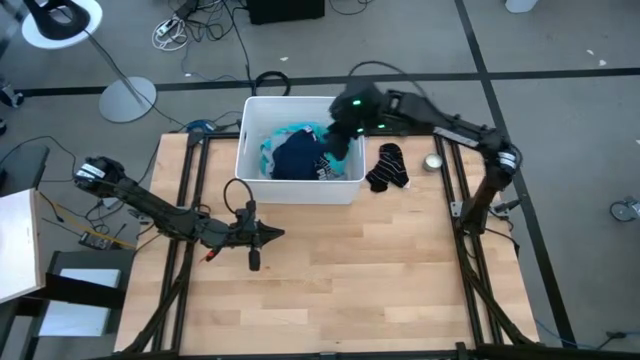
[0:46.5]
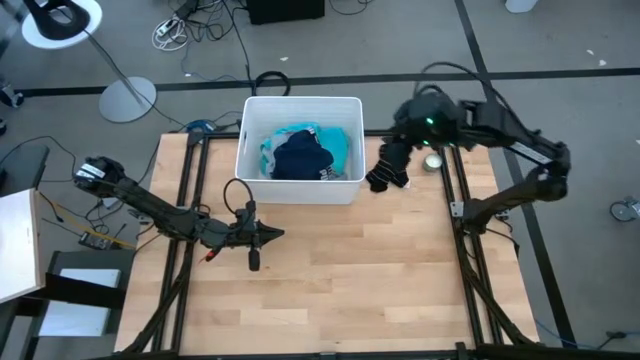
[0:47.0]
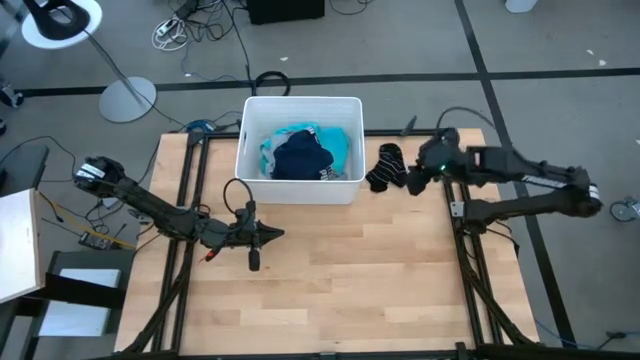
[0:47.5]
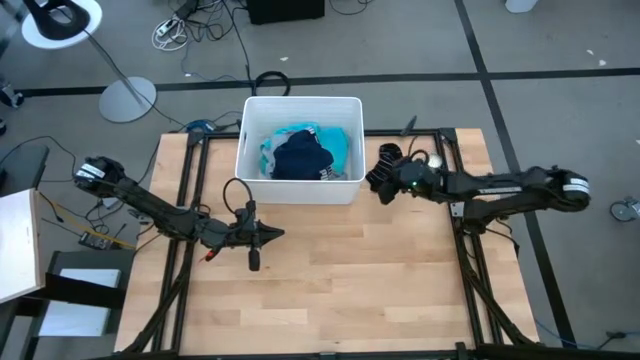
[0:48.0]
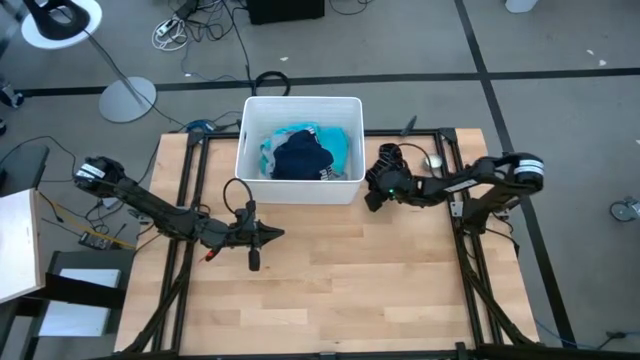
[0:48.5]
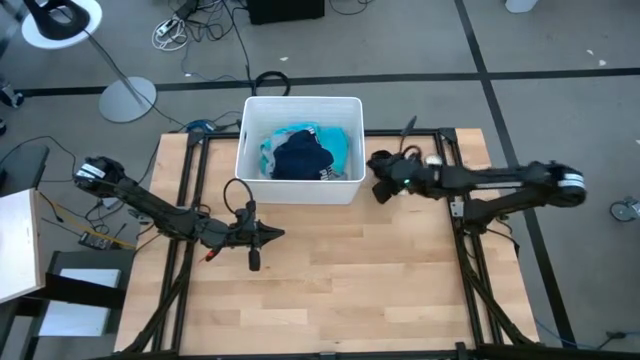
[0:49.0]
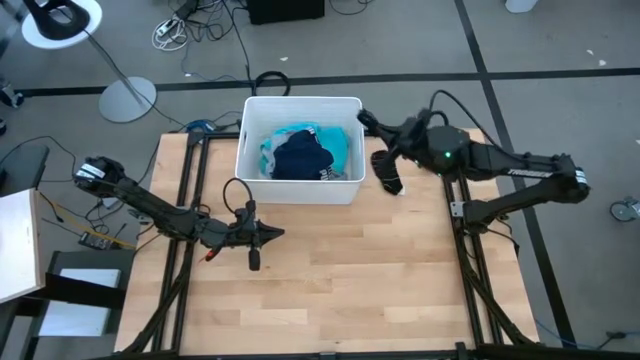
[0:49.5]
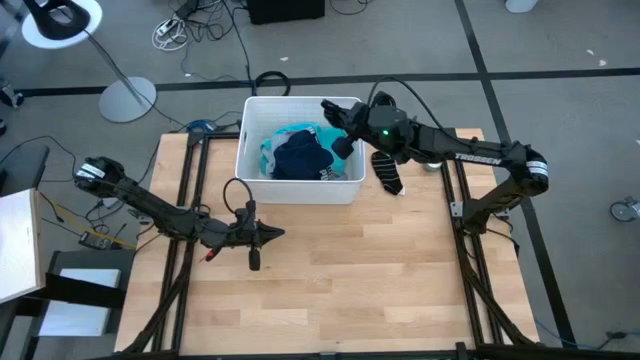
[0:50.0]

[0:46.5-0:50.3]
Task: Sort clothes
Put the left black sock into the white laundry bin

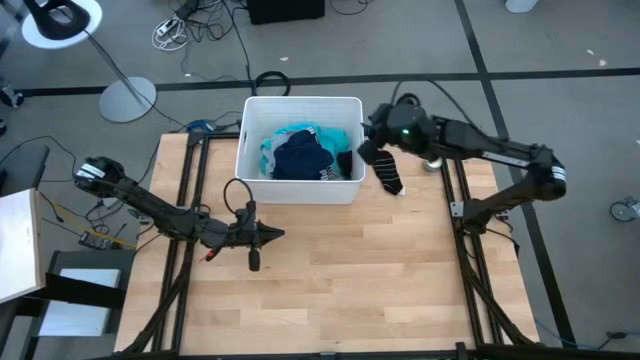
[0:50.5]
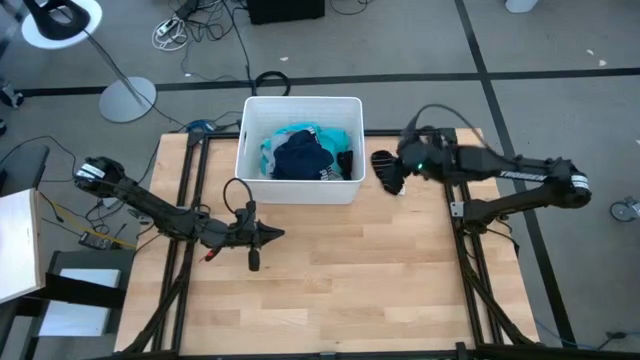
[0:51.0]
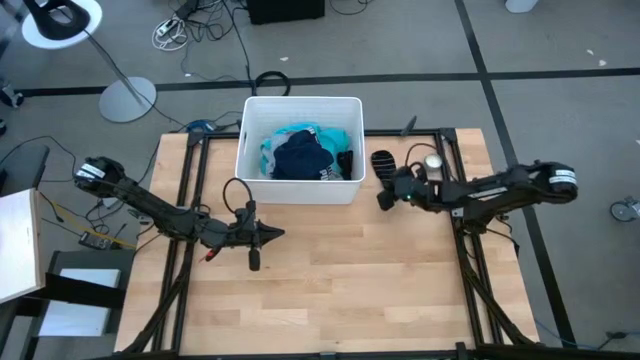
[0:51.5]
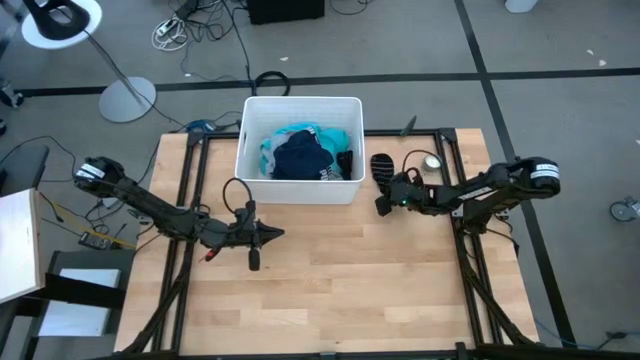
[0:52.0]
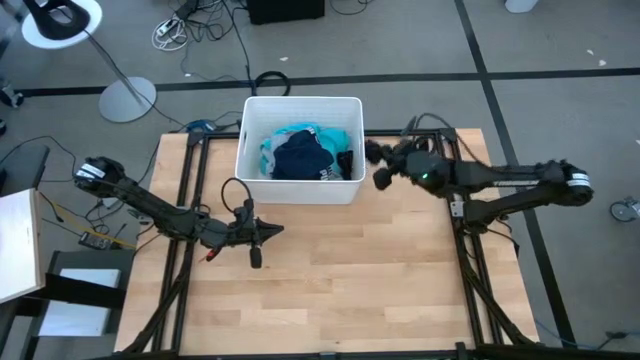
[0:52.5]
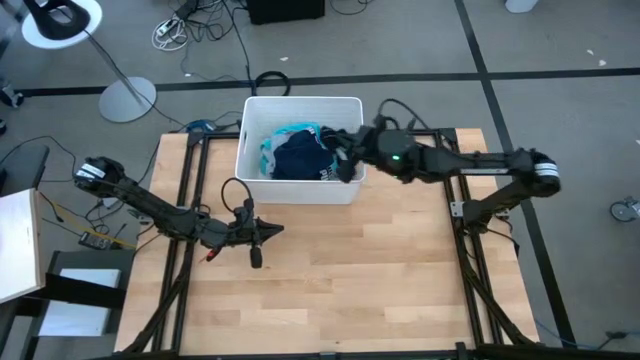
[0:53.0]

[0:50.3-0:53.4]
Put the black sock into the white laundry bin

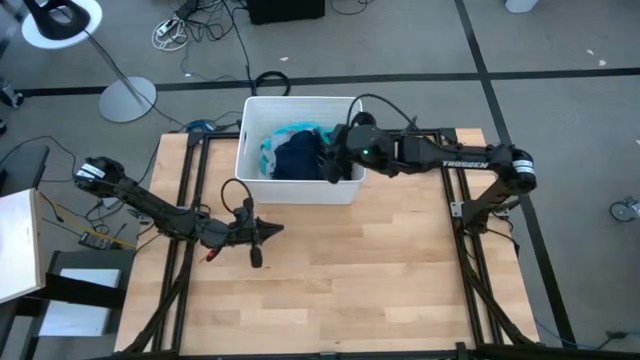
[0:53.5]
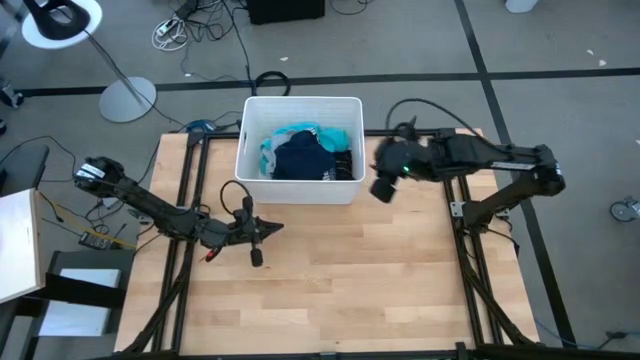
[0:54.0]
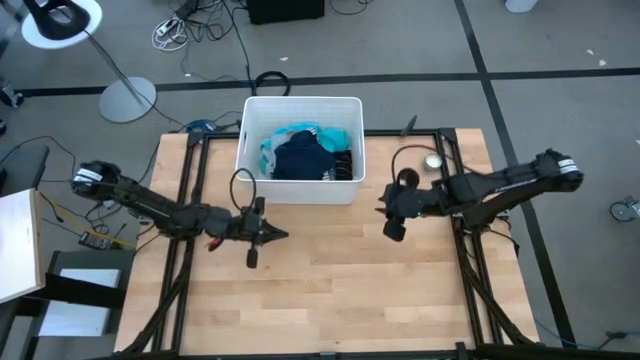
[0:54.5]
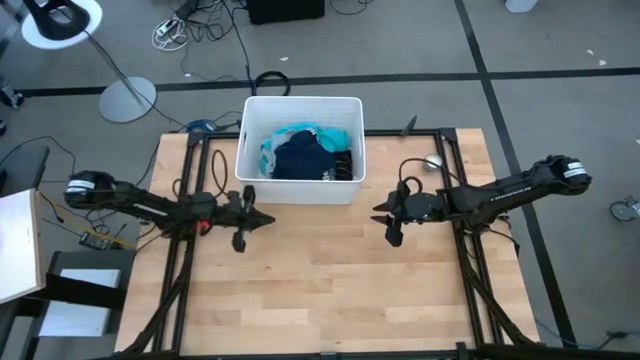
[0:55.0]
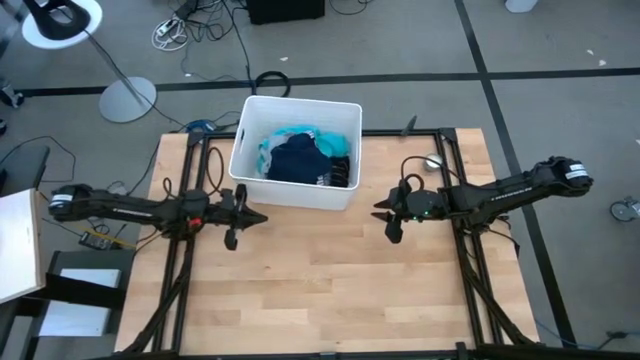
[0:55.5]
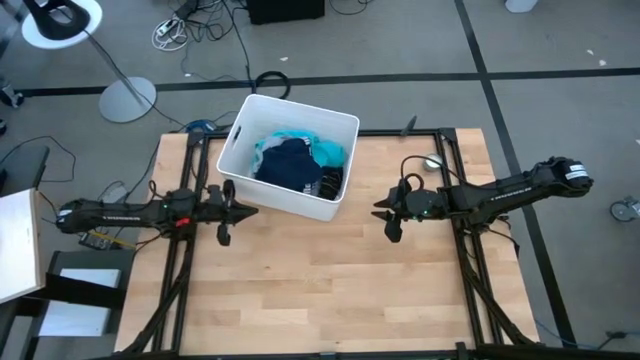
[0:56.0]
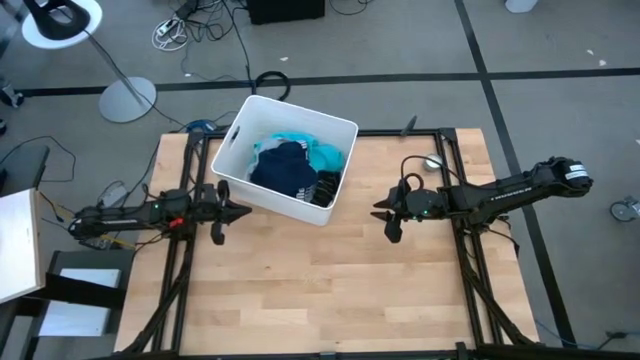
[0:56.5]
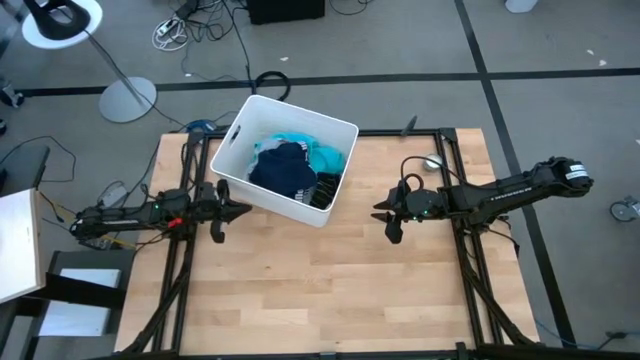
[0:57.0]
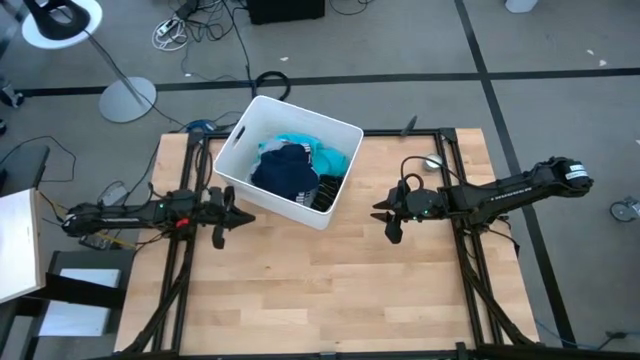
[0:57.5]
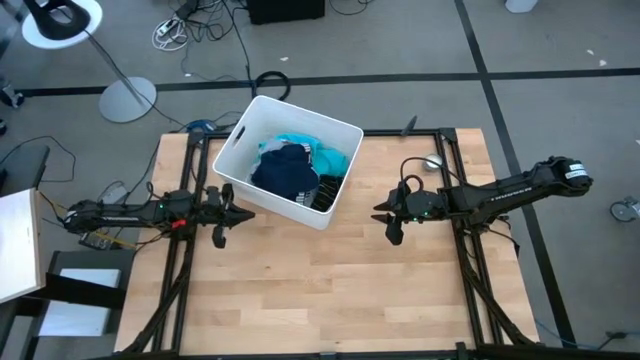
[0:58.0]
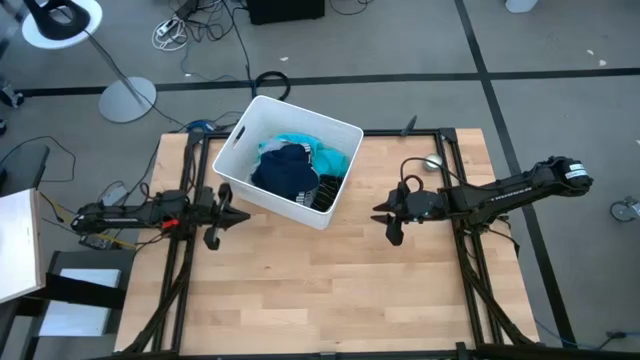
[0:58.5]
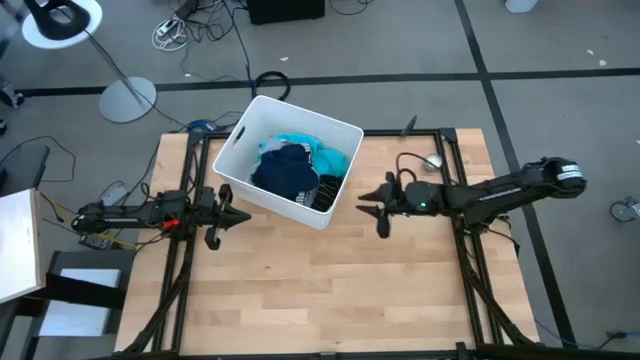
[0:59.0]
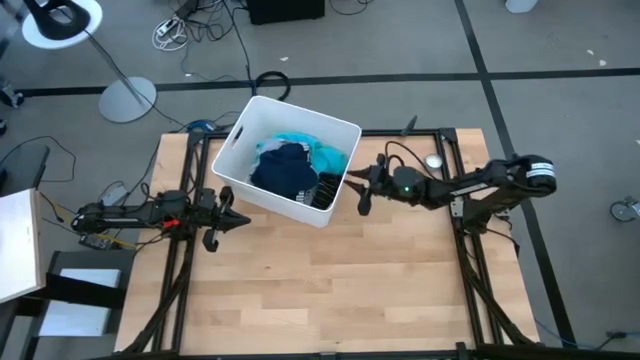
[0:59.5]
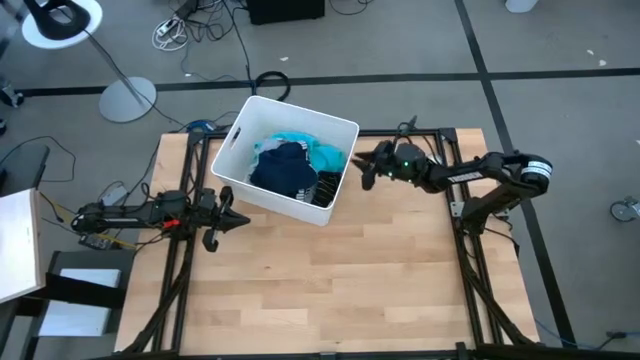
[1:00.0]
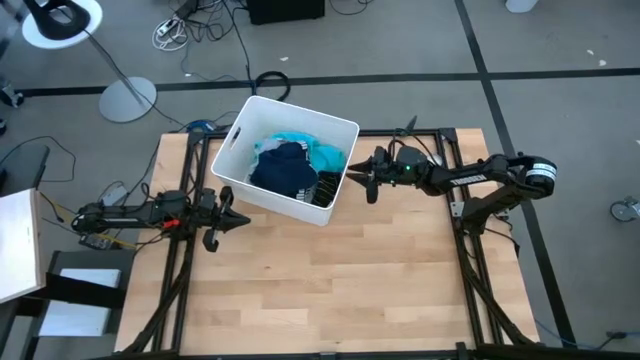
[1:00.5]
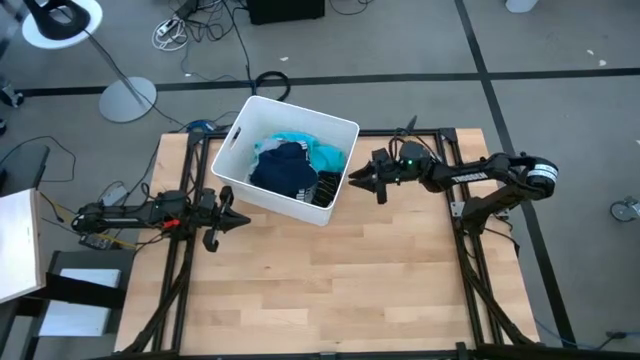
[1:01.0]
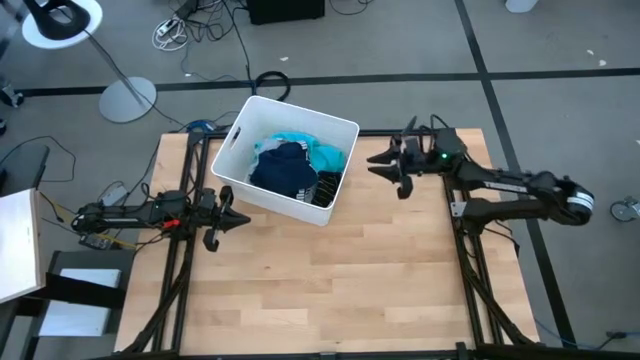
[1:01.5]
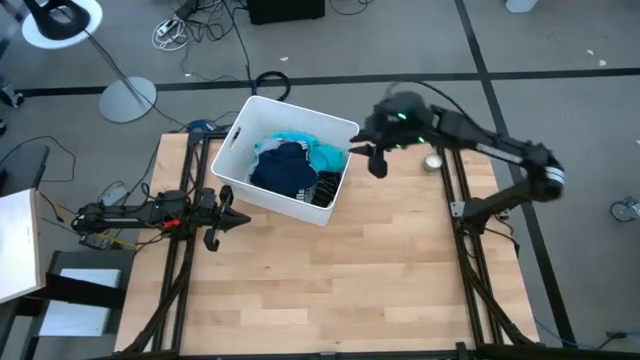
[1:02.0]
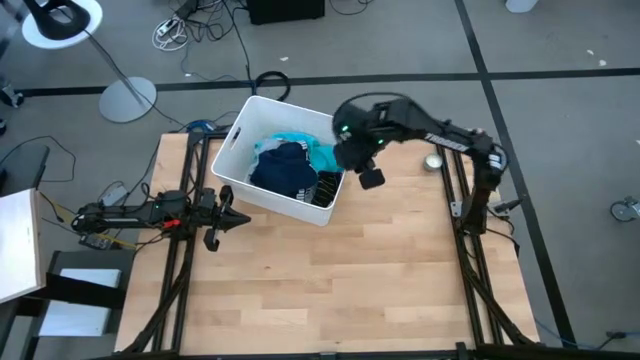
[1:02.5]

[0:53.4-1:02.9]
Adjust the white laundry bin

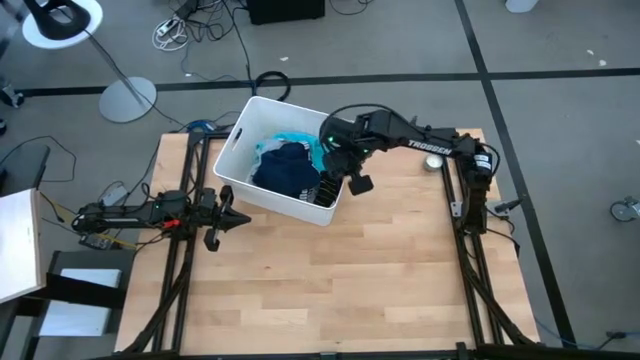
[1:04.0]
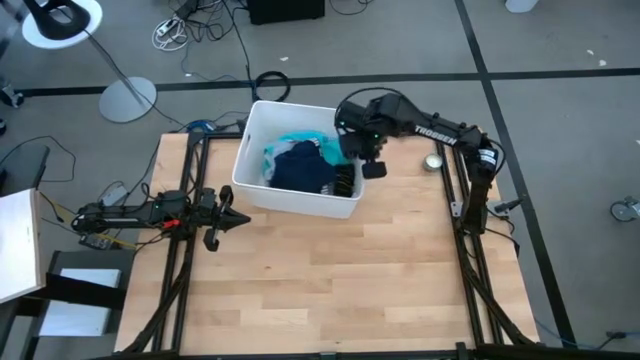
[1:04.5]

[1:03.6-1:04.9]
Adjust the white laundry bin

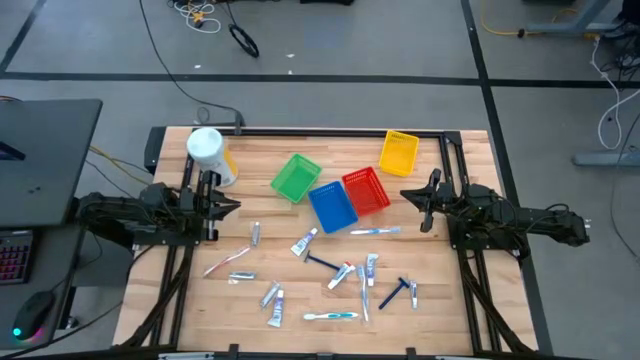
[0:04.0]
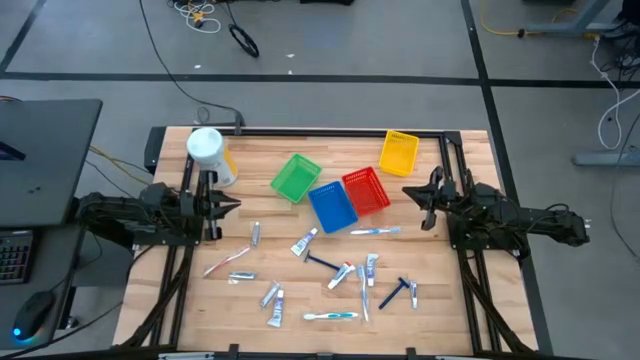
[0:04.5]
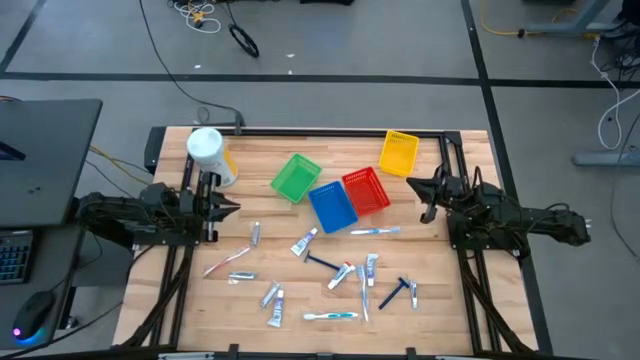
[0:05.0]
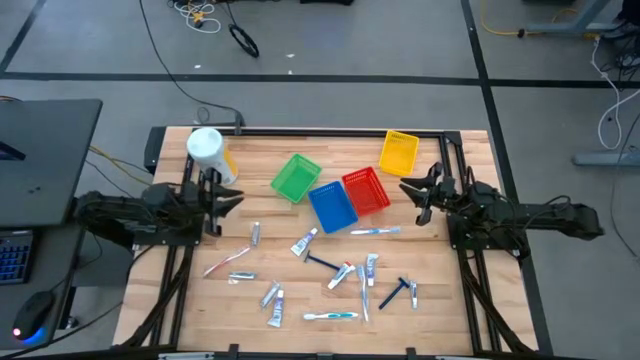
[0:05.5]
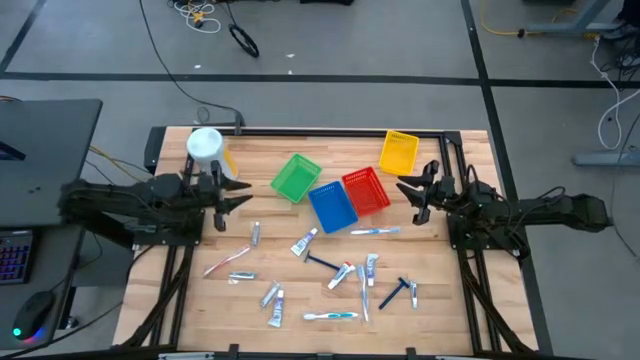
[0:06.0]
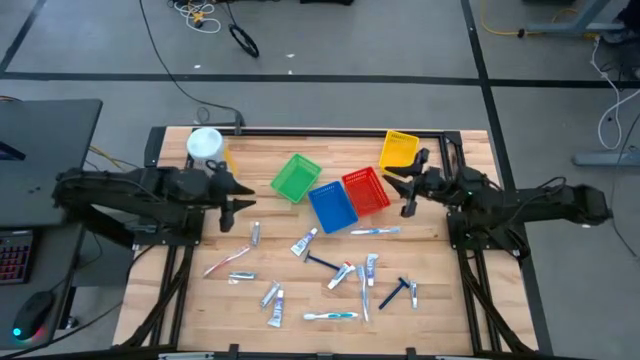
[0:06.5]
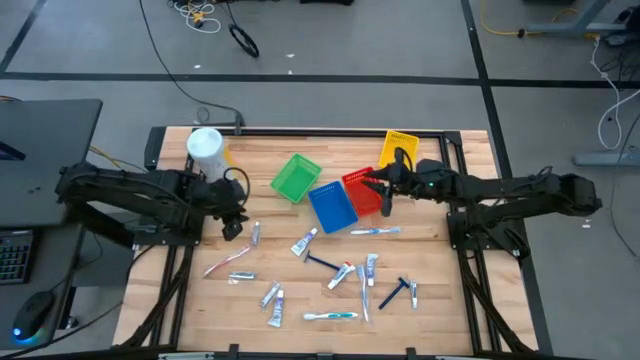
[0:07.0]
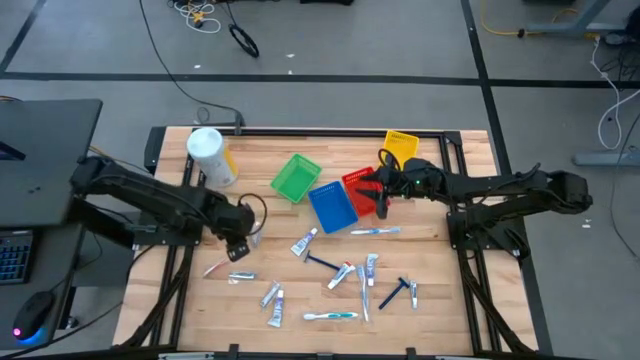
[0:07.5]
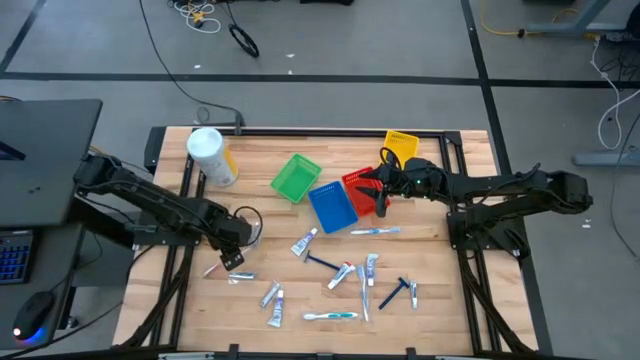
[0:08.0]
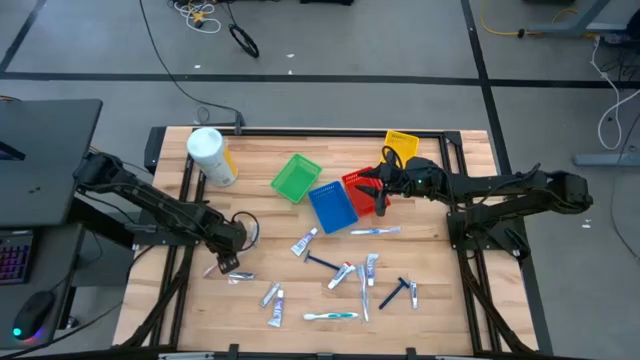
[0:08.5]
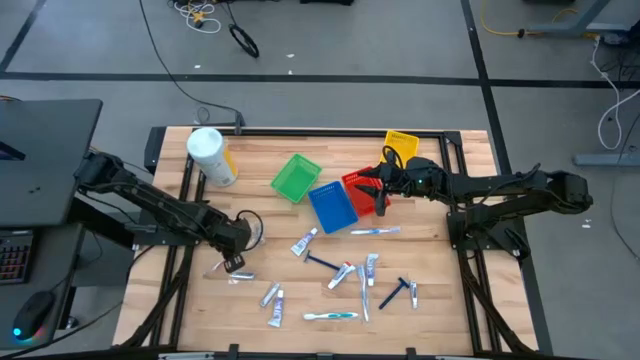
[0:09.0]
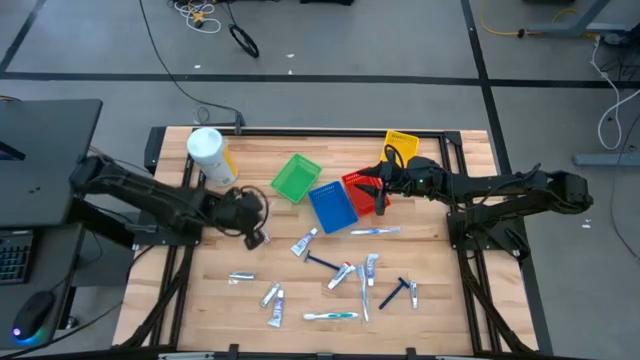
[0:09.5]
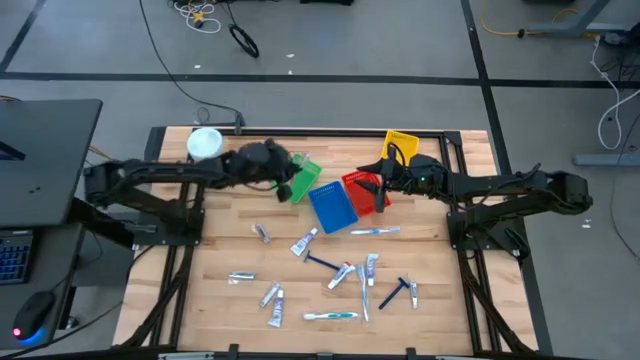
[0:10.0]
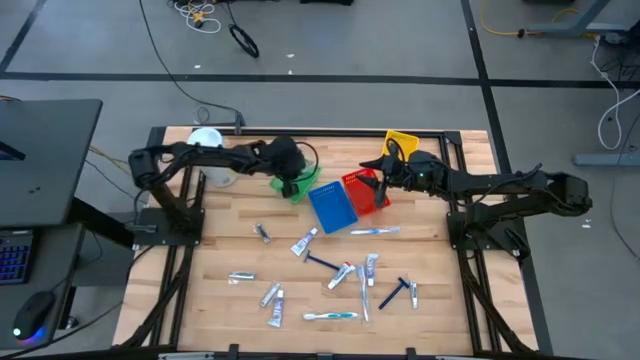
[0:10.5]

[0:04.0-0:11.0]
Task: Pick & Place Travel size toiletries
Put the red toothbrush into the green bin
